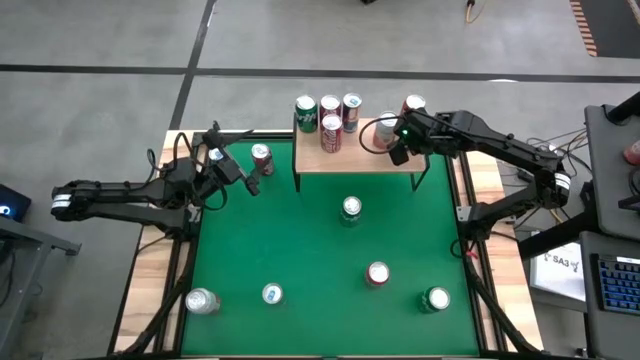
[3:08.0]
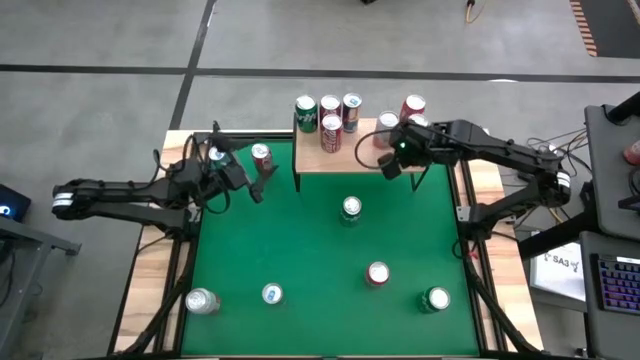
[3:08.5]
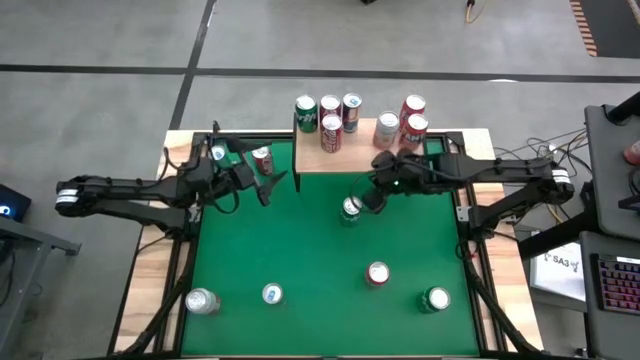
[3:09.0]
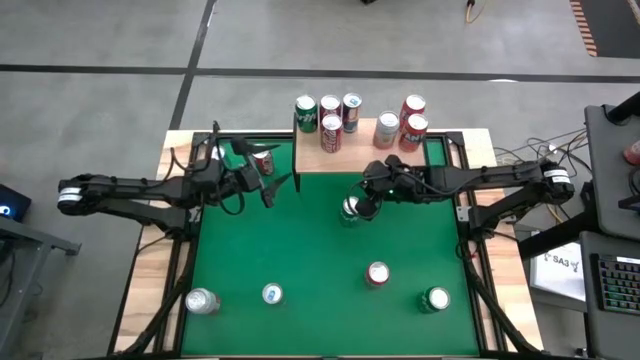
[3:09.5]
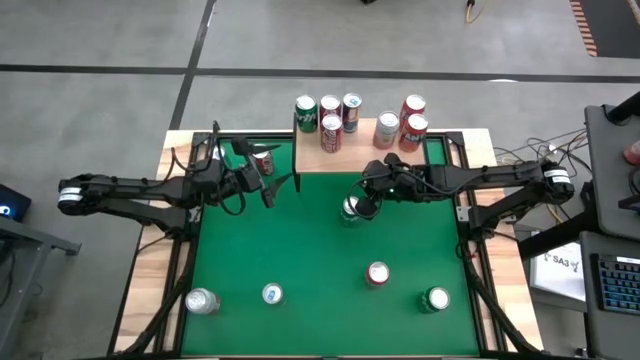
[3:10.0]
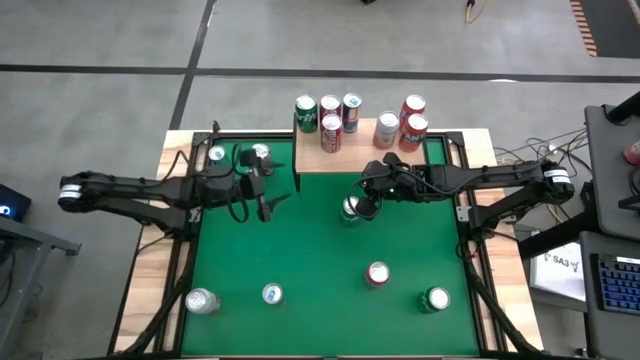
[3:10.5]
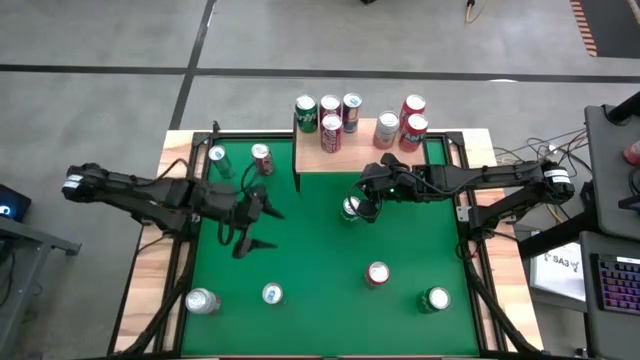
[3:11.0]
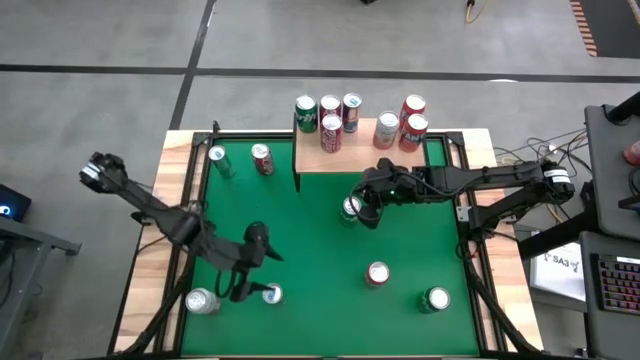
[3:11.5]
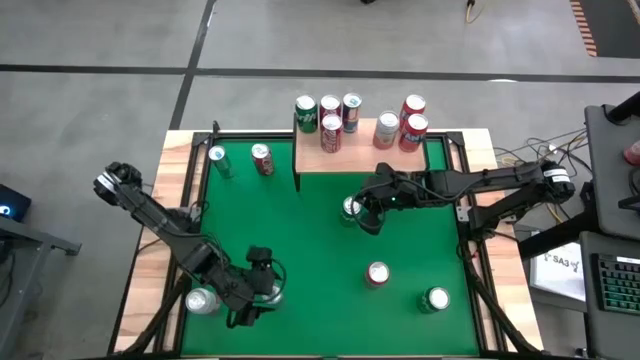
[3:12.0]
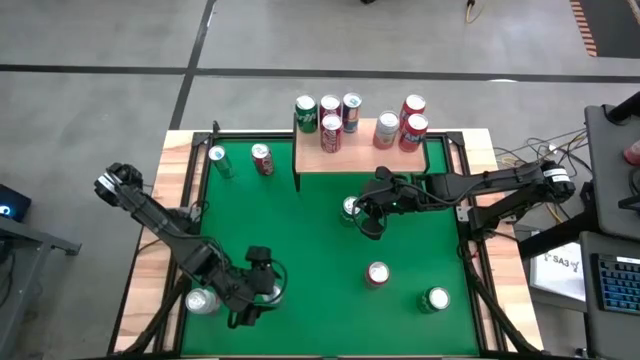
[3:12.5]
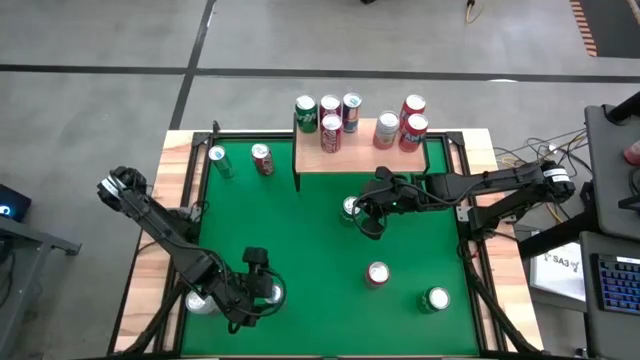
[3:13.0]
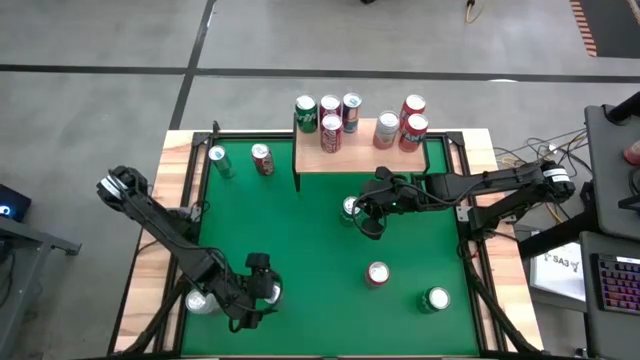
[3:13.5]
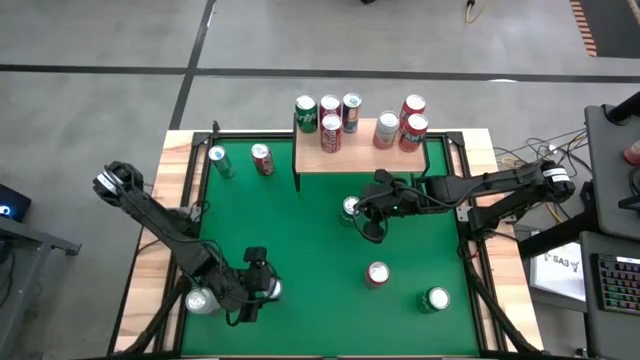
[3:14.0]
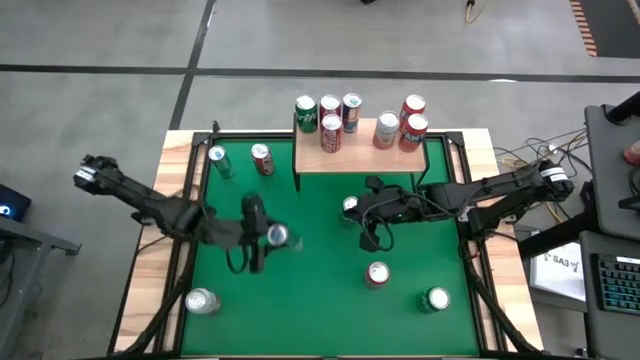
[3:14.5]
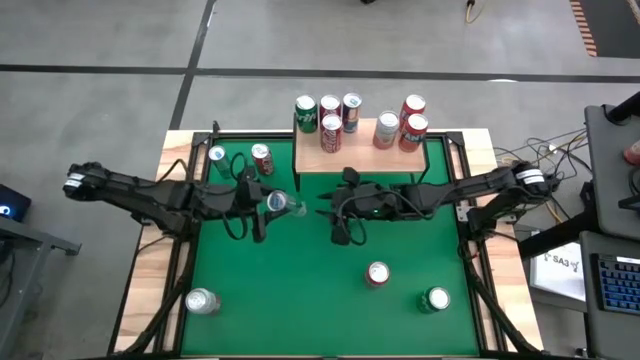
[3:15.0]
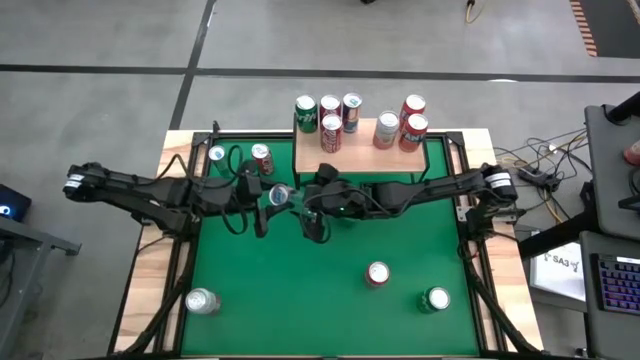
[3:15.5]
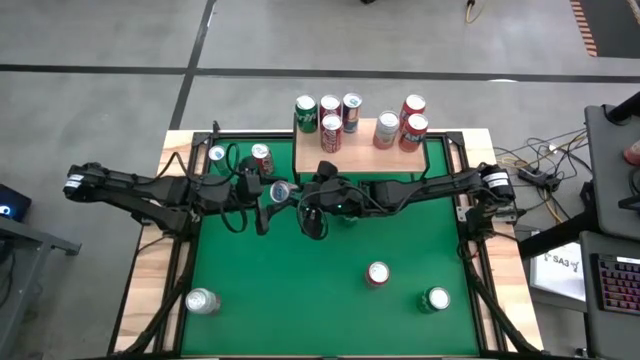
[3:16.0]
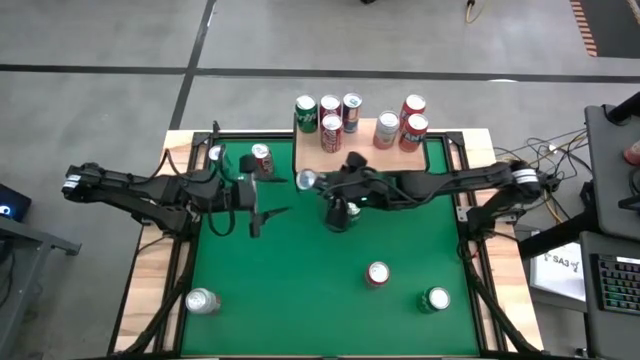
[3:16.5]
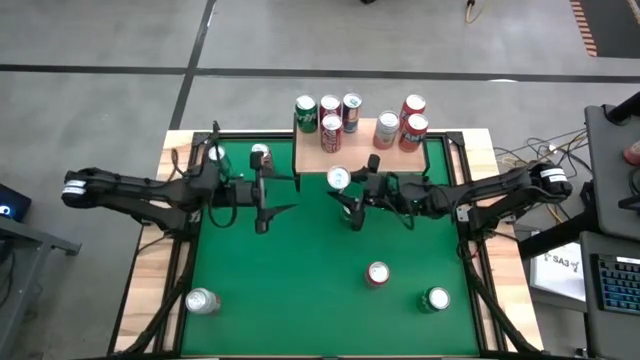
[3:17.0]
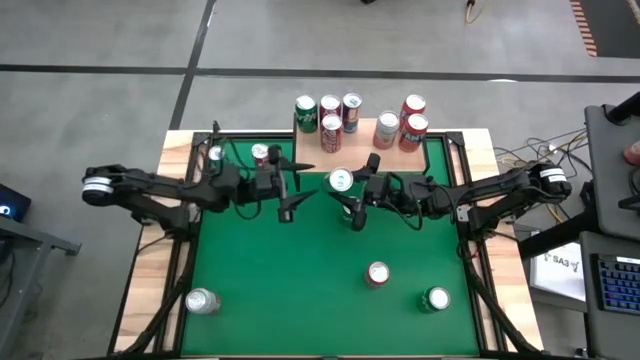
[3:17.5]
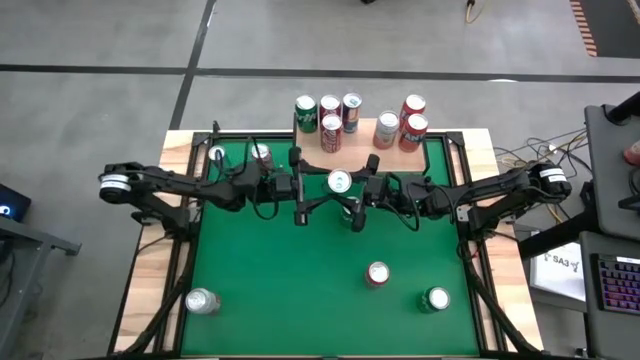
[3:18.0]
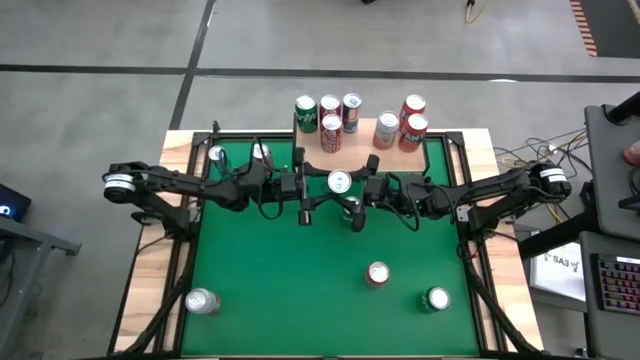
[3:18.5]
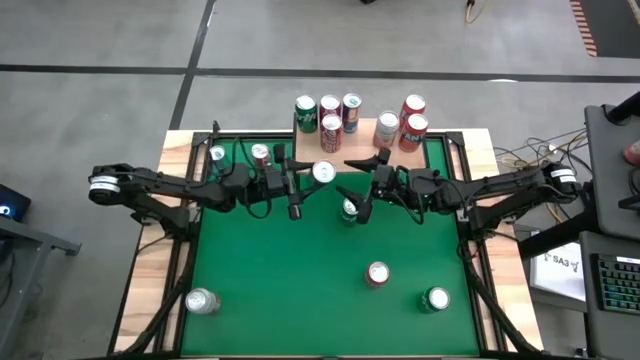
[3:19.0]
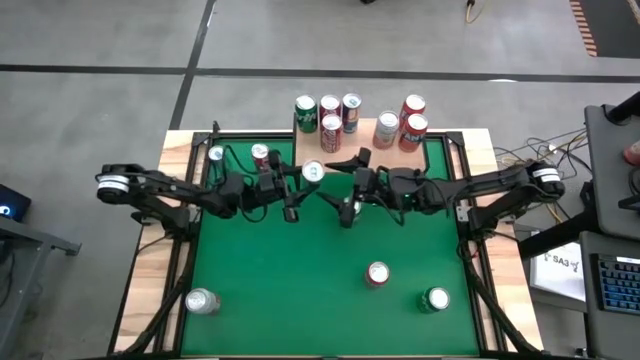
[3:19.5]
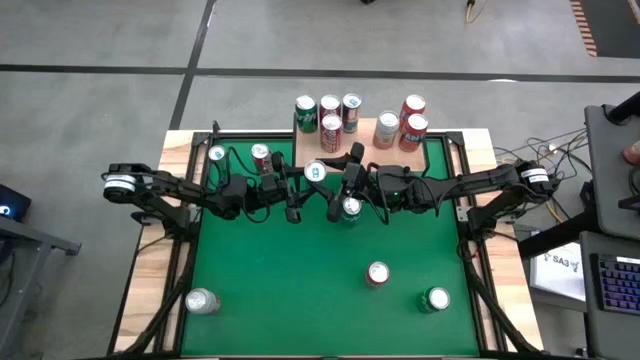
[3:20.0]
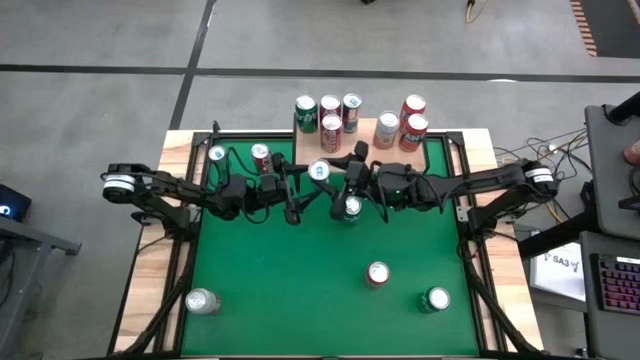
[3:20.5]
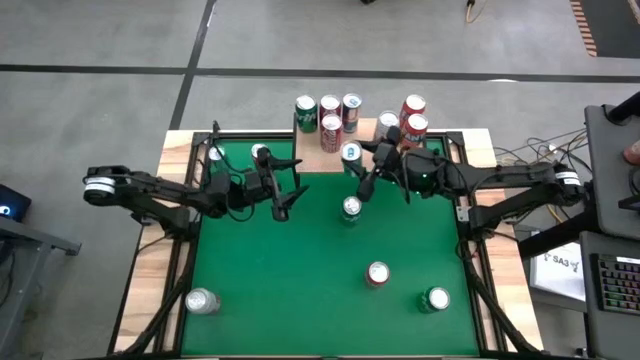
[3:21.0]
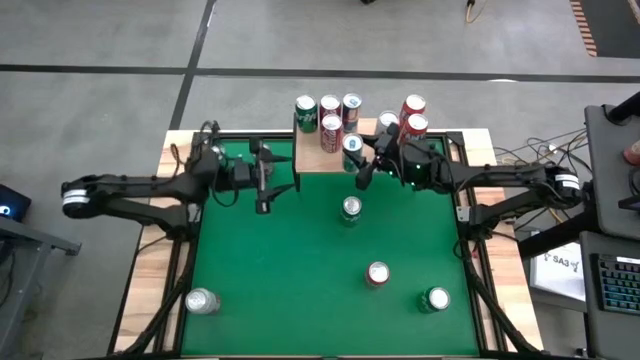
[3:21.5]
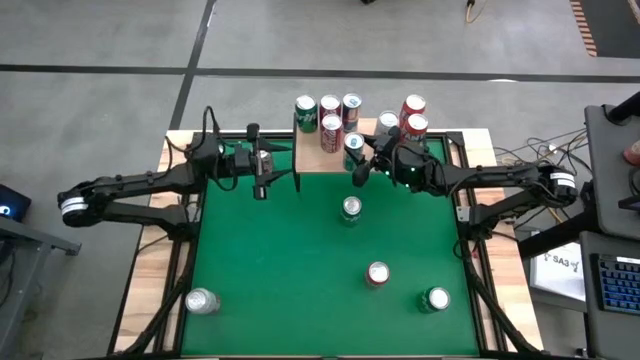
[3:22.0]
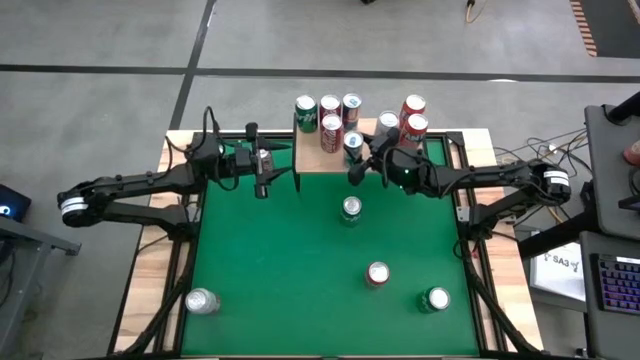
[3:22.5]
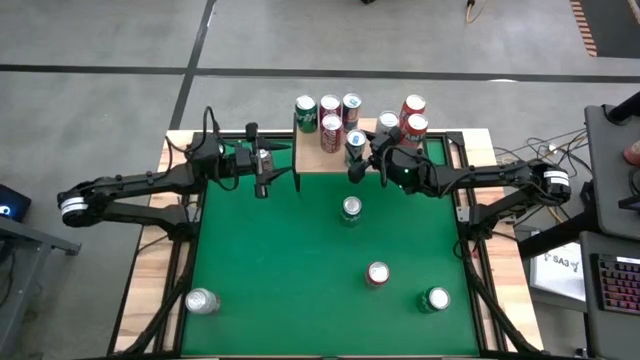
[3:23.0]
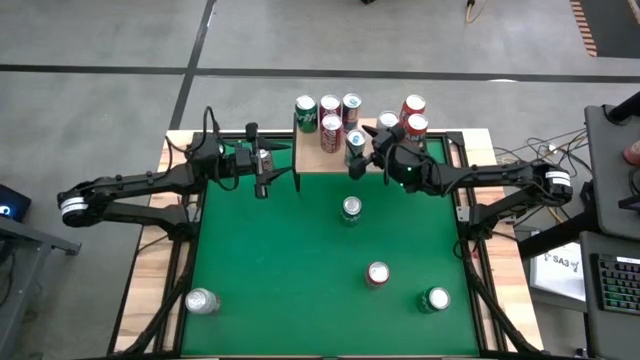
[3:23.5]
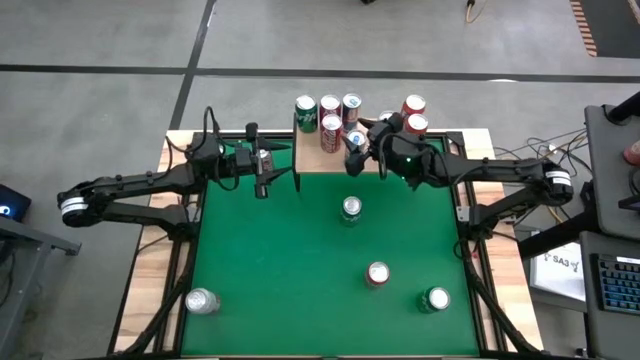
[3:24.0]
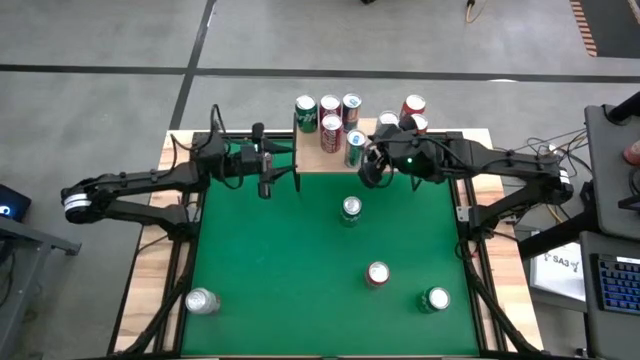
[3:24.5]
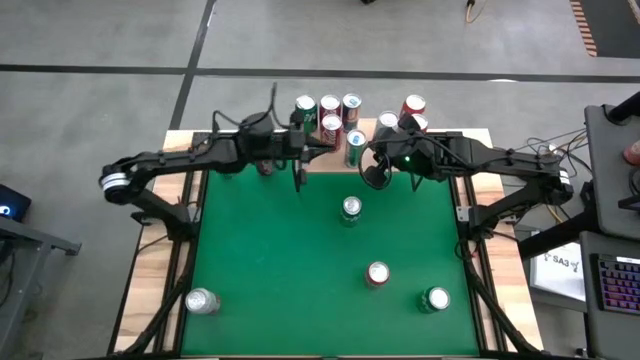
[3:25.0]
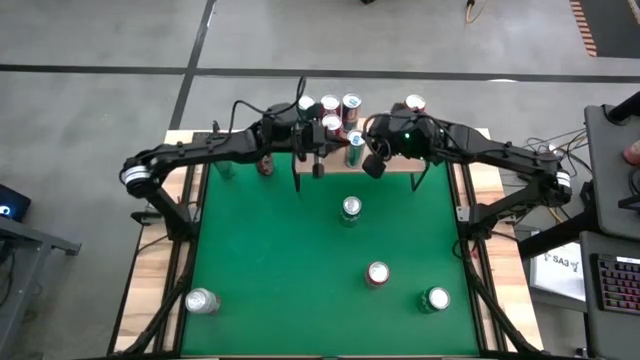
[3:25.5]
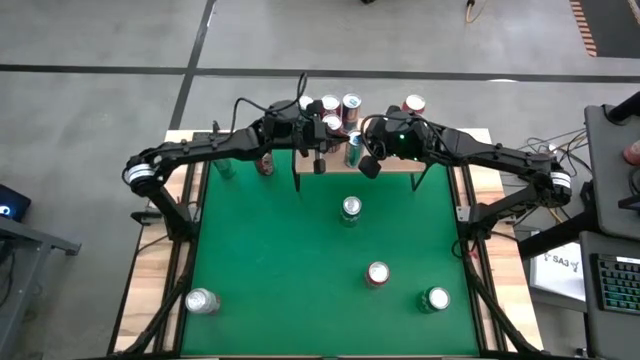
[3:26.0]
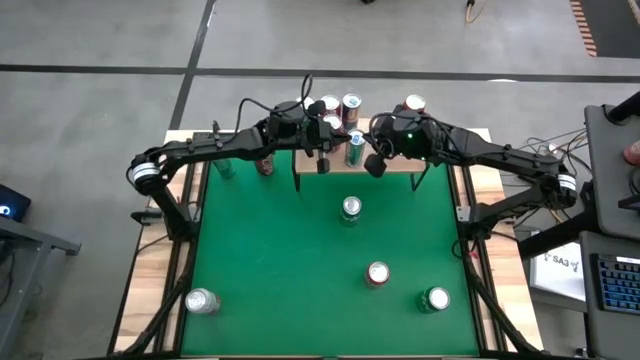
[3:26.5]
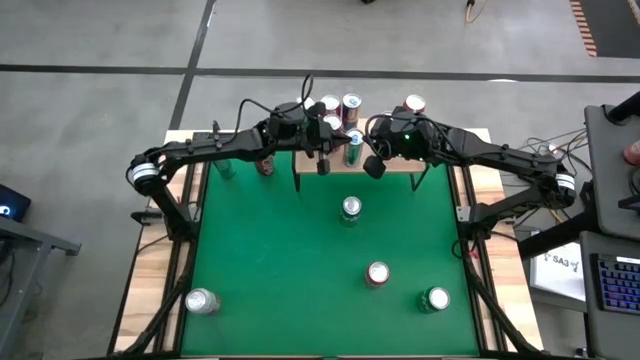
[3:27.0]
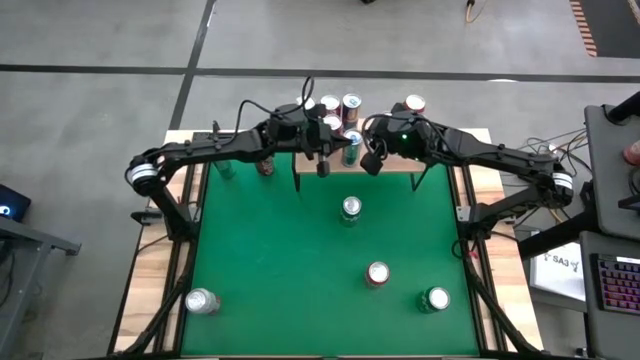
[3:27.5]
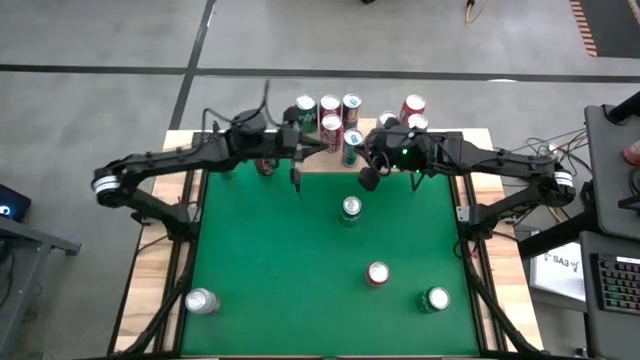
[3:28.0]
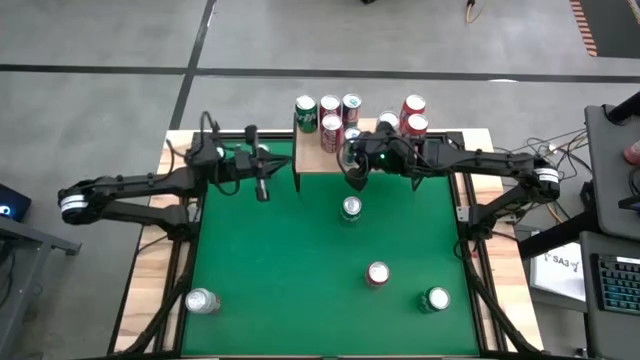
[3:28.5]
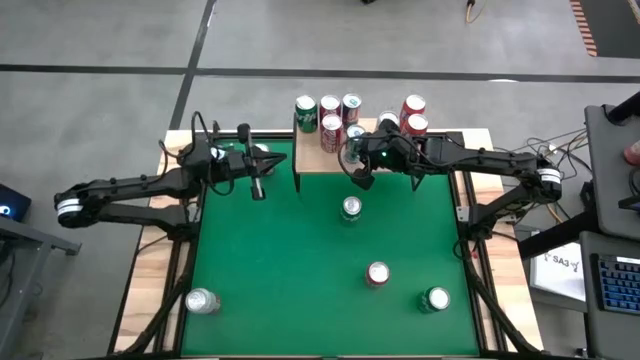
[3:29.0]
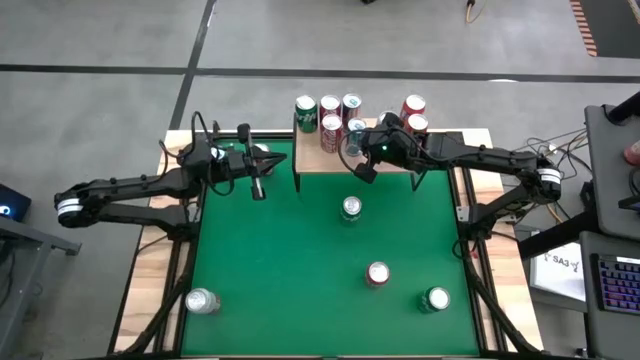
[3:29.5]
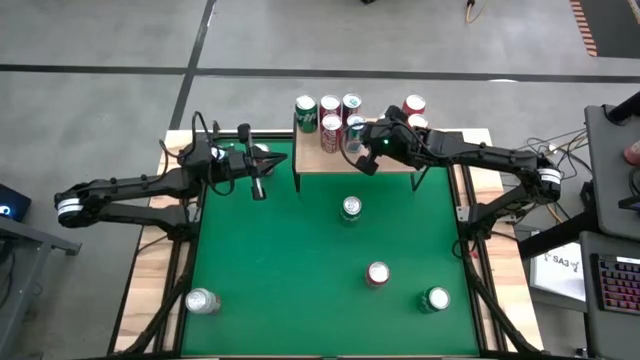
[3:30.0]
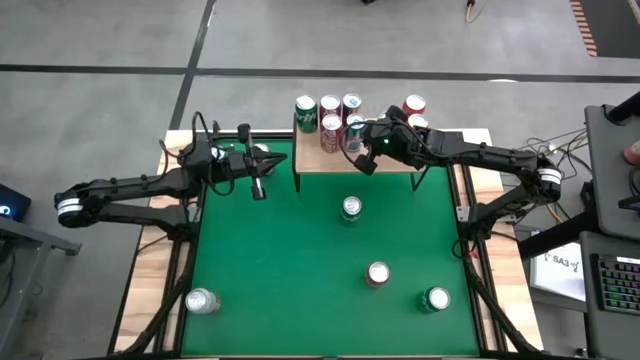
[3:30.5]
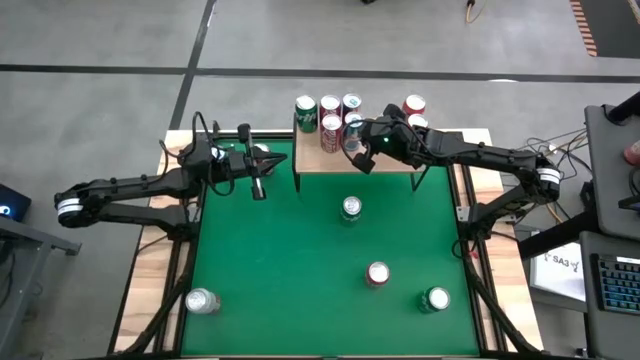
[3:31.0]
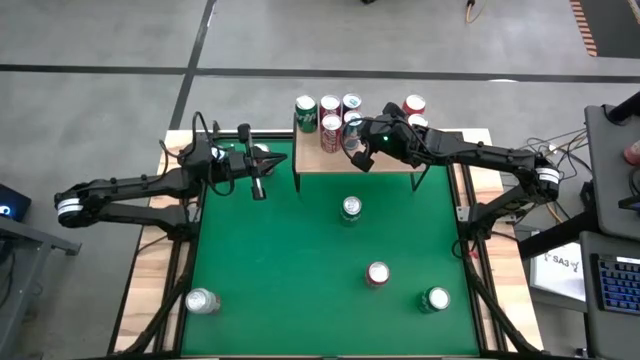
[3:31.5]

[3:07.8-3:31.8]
Task: Place canned beverage on shelf
Put the bottom blue soda can aligned with the blue soda can on the shelf
